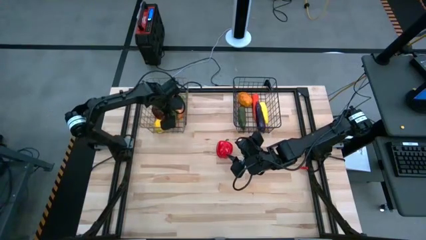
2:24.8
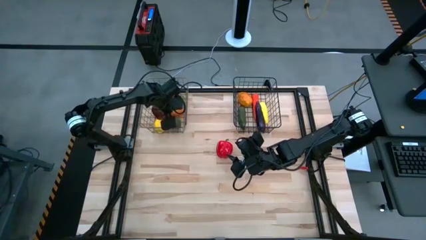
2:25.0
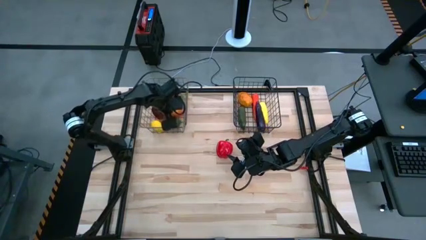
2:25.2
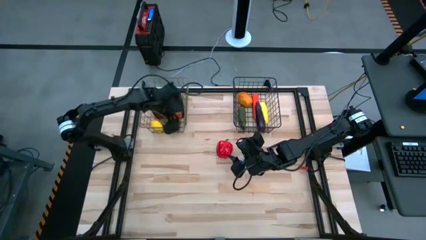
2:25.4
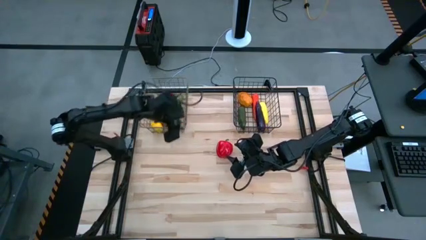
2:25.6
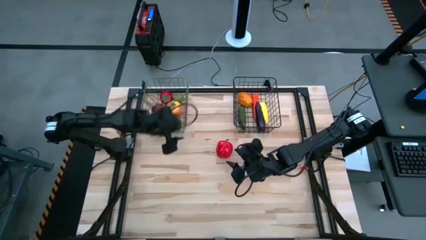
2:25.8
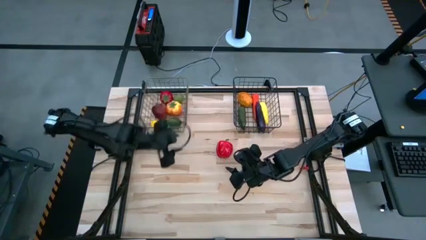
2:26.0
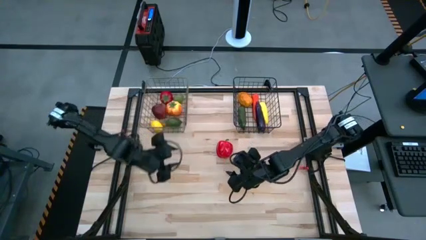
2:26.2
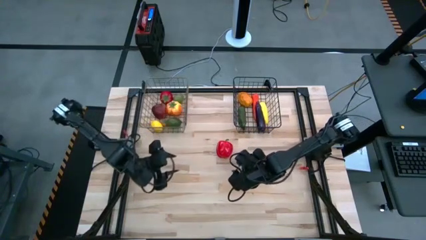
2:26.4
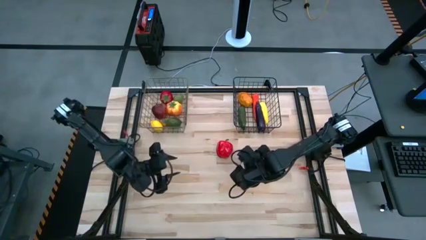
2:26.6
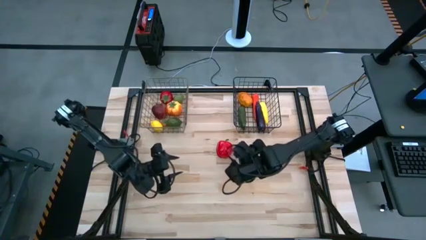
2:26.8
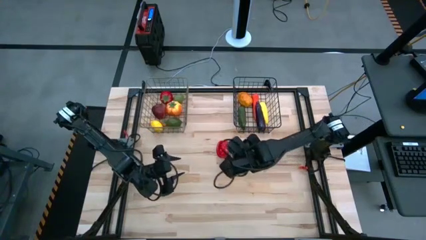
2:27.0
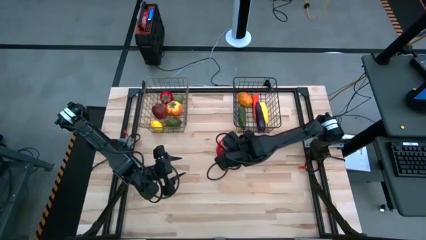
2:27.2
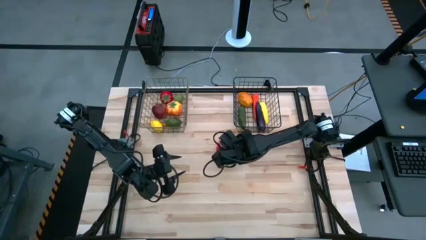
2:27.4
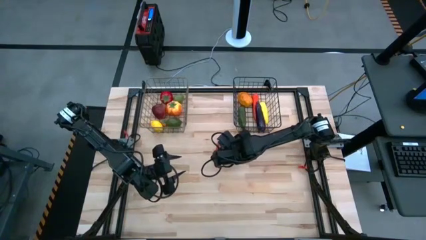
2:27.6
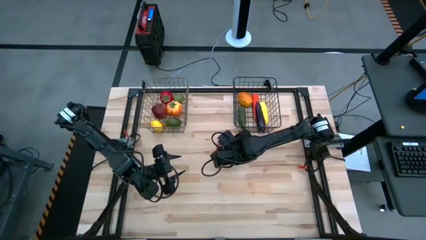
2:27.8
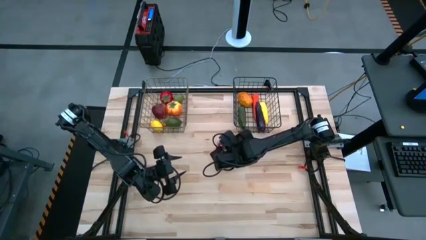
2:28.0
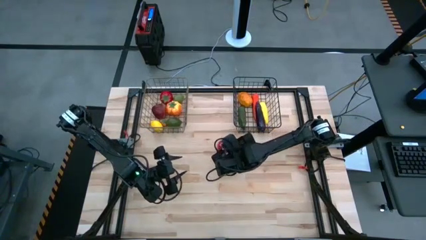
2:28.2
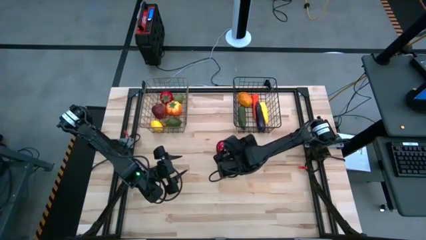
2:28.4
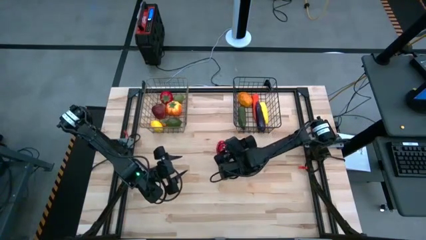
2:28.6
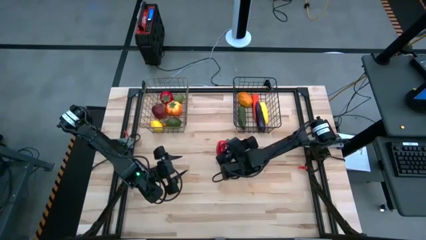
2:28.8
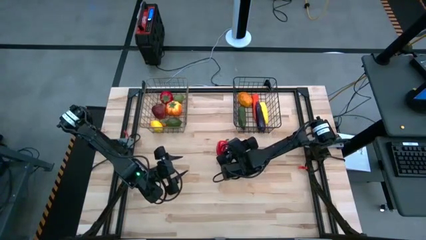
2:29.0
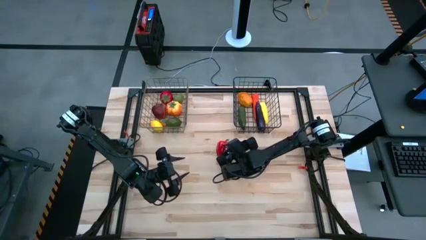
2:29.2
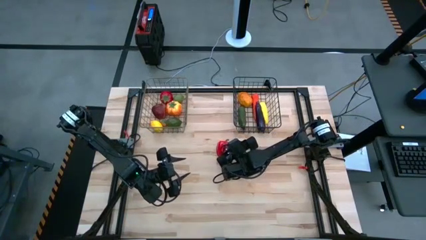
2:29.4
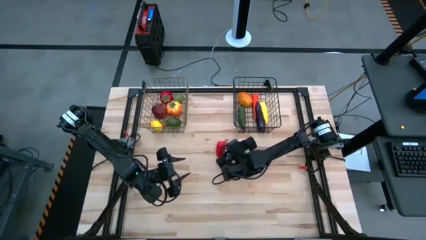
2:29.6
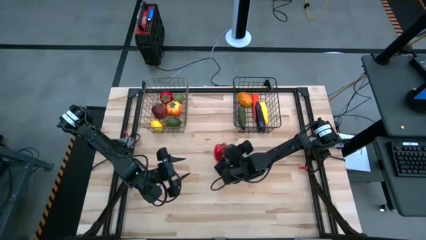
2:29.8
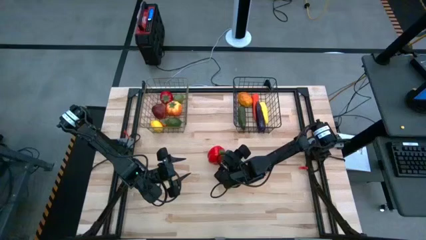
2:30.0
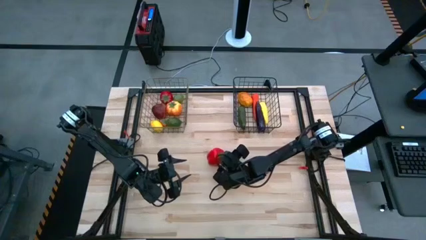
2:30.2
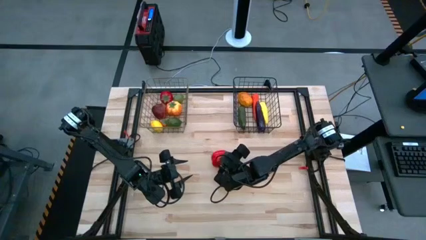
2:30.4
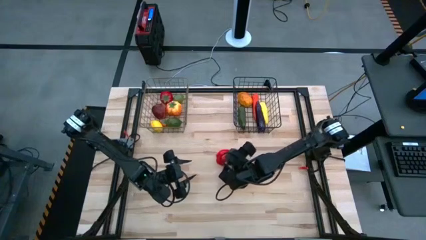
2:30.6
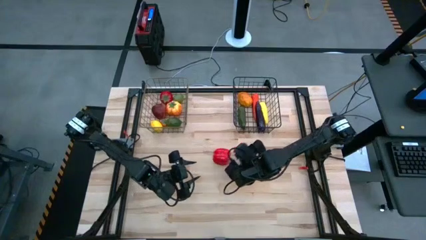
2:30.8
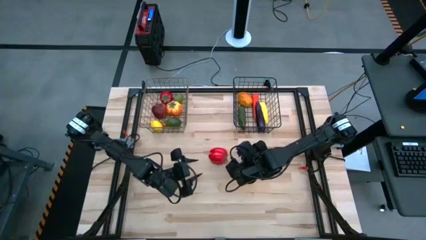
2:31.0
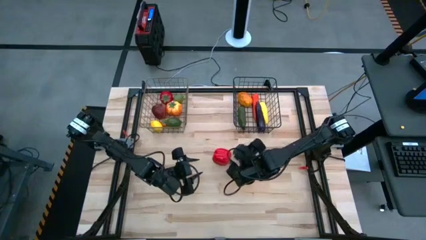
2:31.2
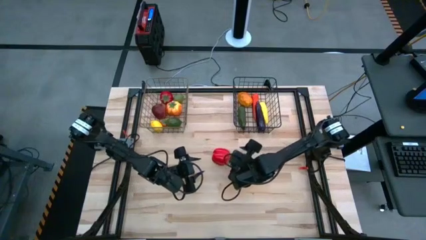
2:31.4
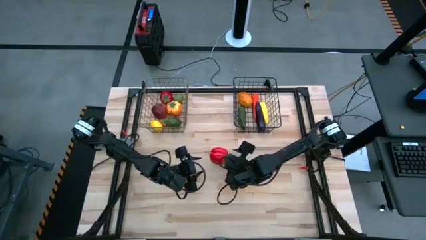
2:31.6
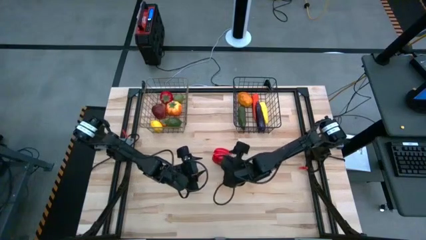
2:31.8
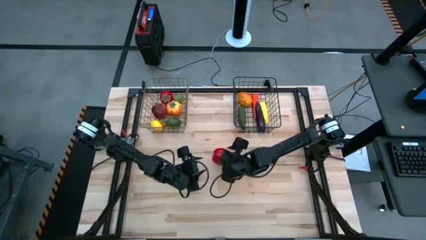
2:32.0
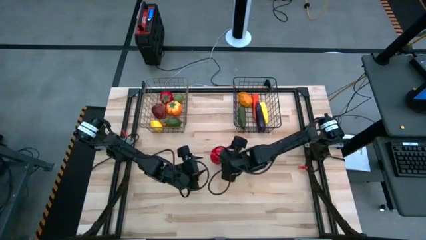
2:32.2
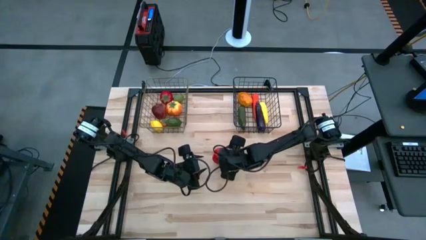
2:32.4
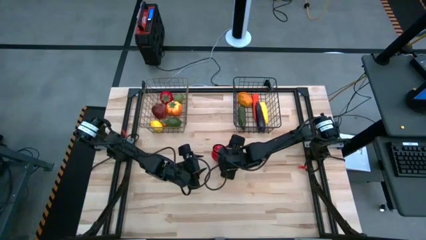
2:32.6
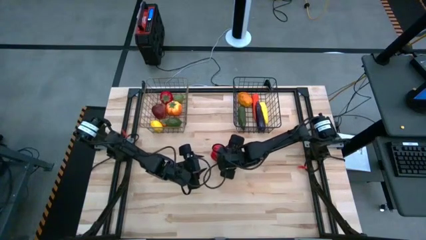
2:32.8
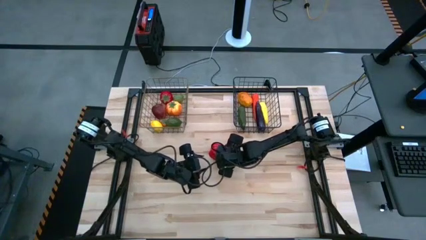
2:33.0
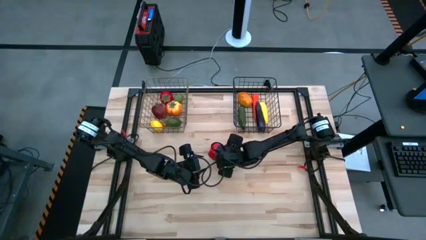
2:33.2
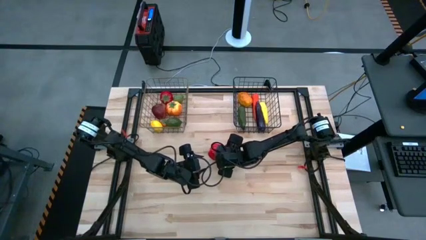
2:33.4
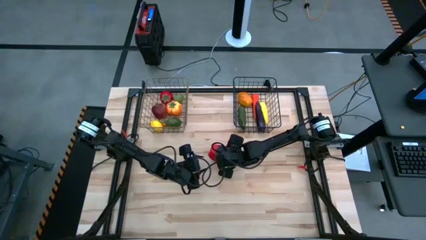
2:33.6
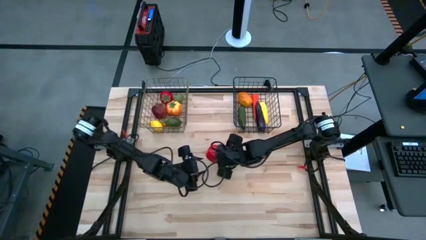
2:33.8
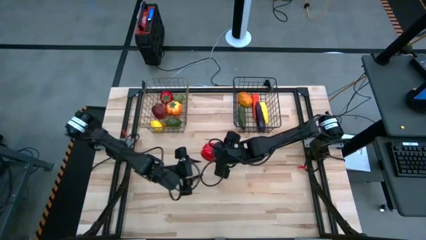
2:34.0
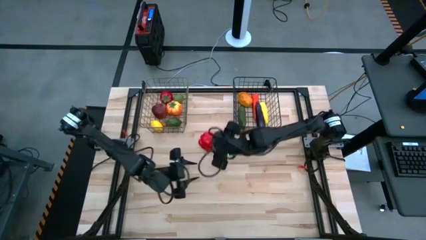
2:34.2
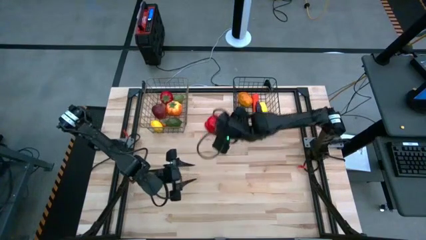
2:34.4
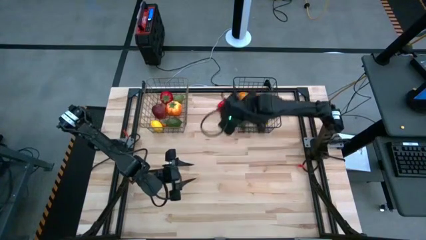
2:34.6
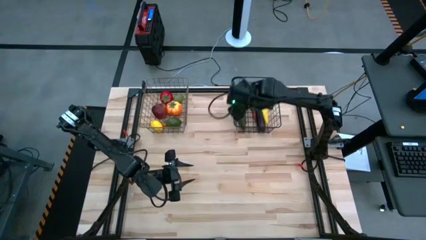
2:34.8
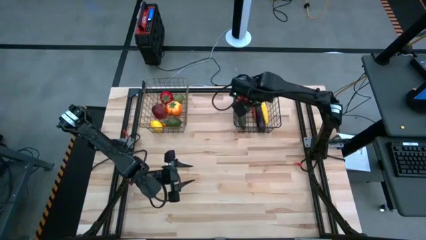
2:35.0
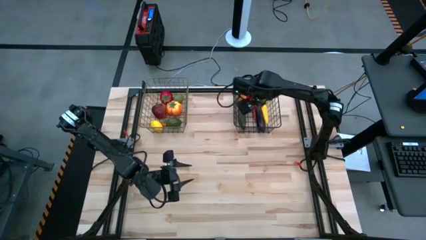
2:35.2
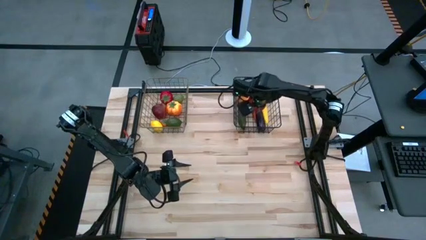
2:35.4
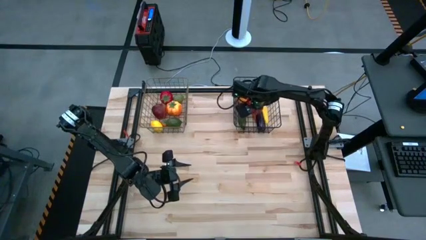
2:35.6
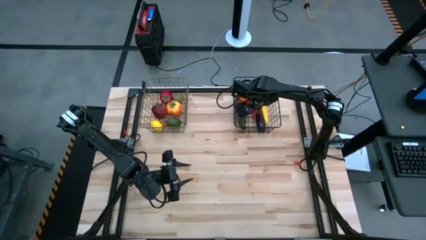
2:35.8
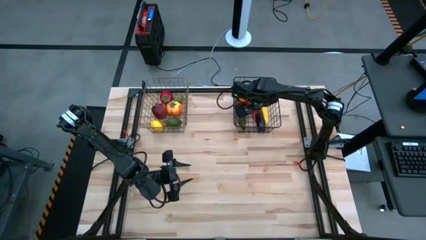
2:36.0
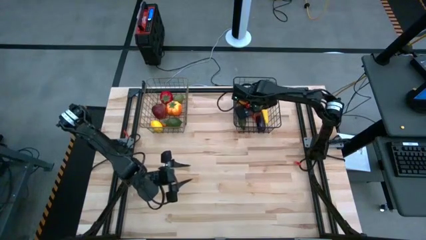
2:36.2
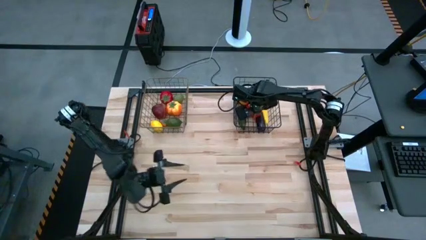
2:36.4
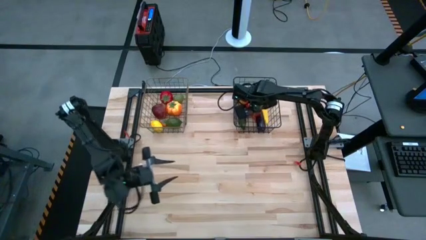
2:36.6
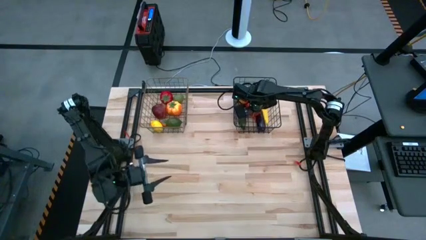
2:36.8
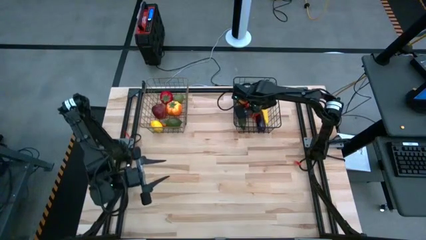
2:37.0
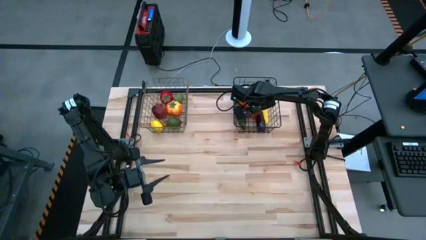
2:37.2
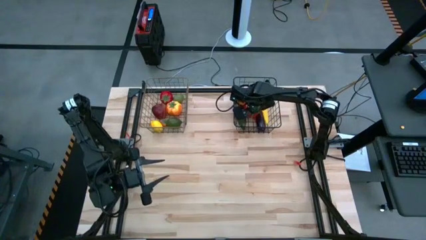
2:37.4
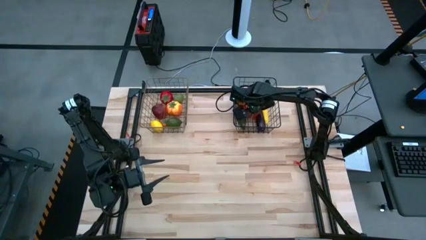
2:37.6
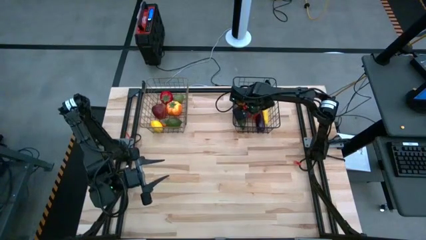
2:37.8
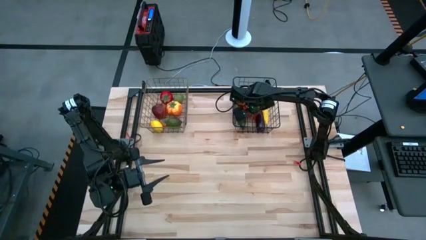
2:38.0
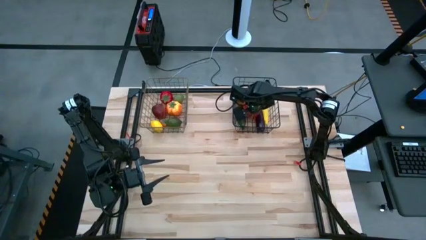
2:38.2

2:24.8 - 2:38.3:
Task: Sort produce into baskets
Put the red bell pepper into the right black wire basket

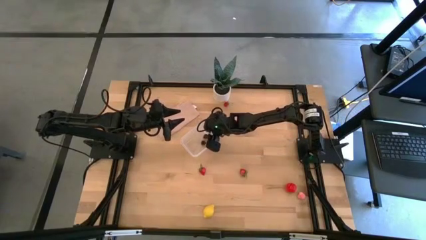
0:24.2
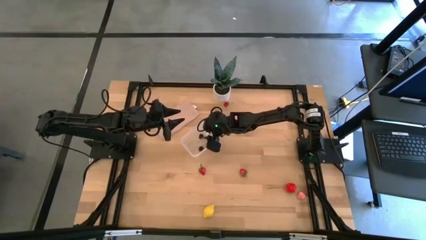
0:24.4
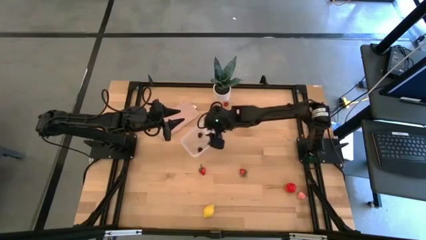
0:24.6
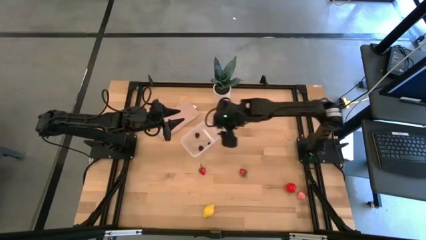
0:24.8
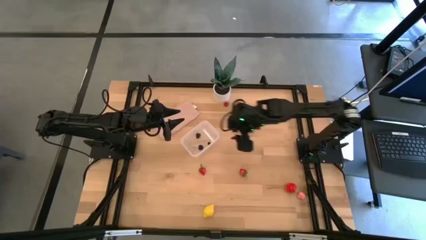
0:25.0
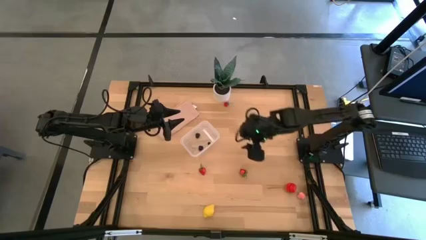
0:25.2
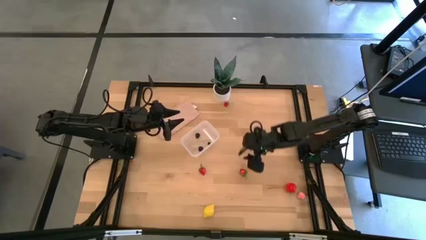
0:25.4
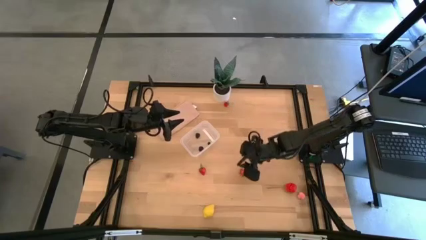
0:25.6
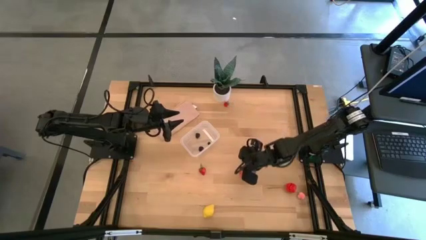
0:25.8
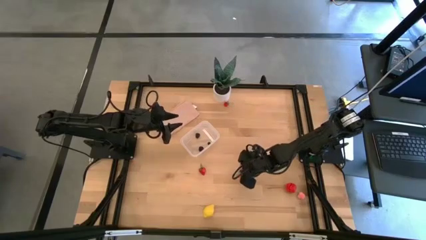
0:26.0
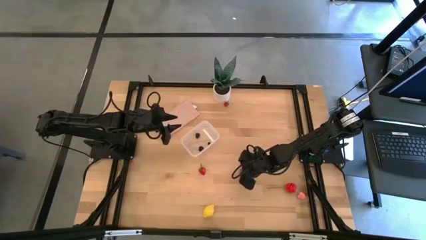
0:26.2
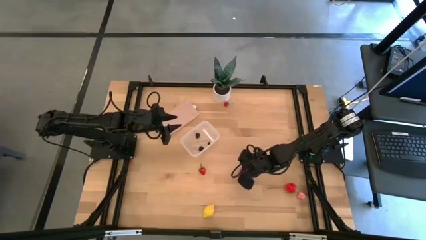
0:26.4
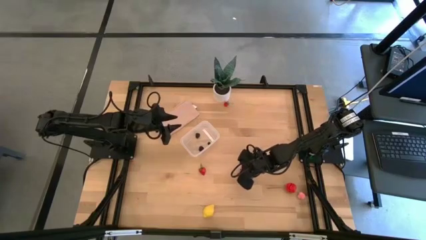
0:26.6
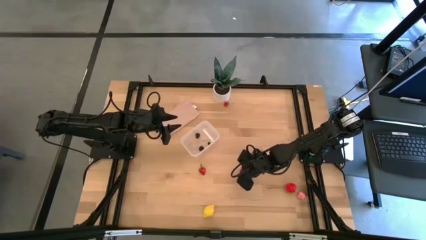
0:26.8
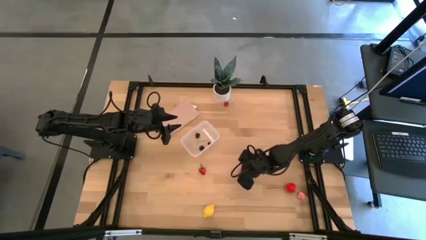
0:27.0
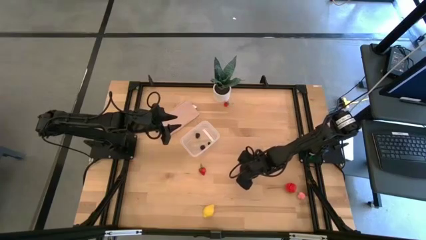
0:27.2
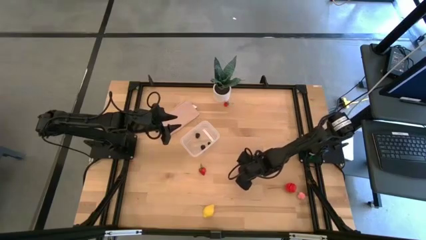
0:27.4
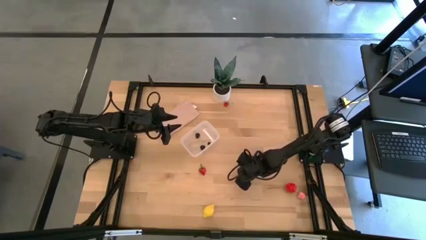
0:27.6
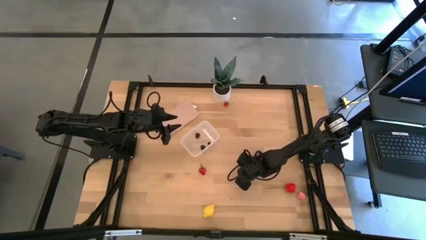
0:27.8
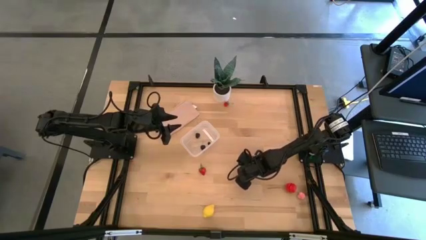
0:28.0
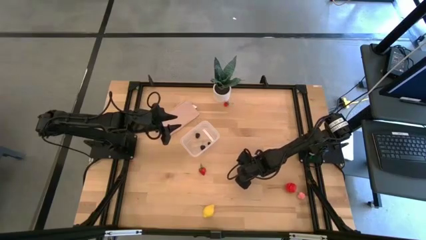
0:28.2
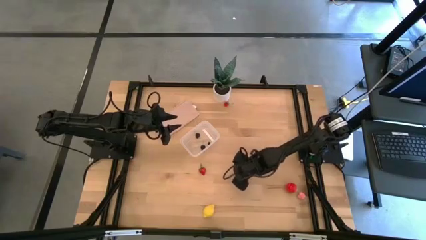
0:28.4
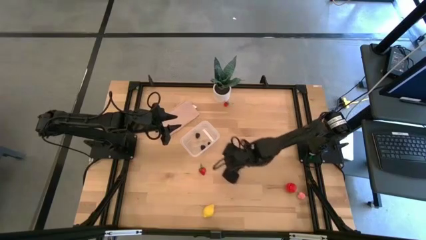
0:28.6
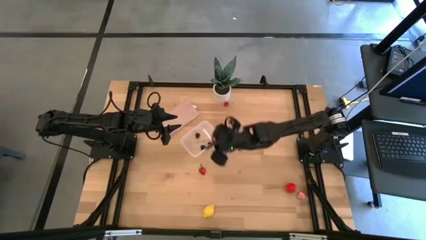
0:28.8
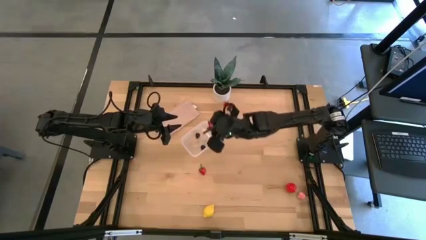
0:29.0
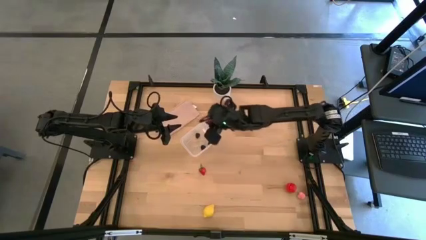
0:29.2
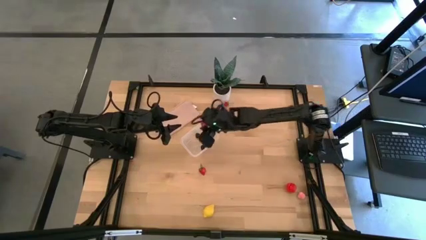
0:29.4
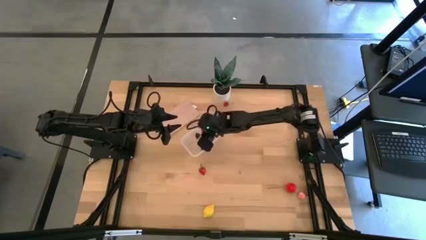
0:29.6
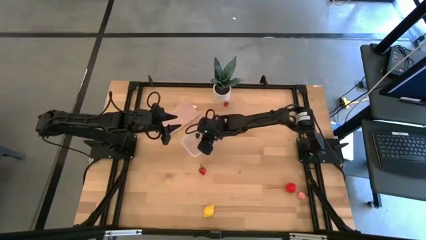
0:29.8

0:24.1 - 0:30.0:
Task: Pick and placing Produce into tupperware
Put the right red strawberry into the transparent bin
